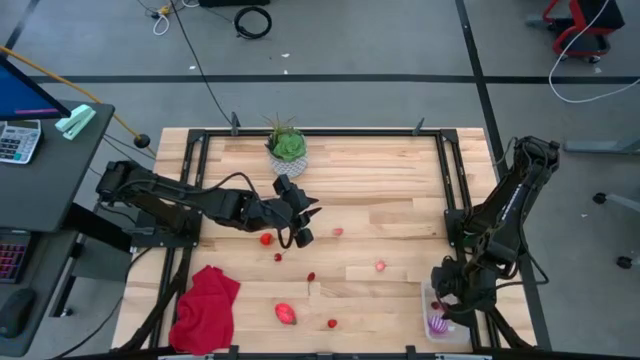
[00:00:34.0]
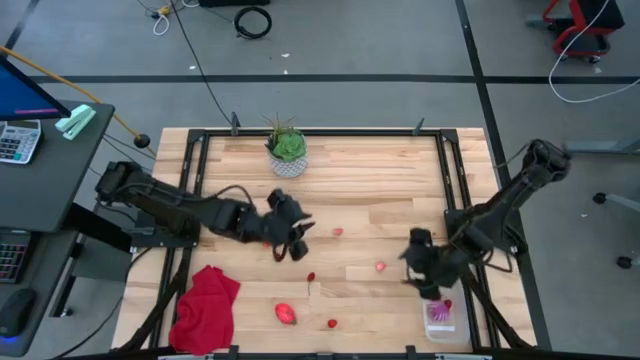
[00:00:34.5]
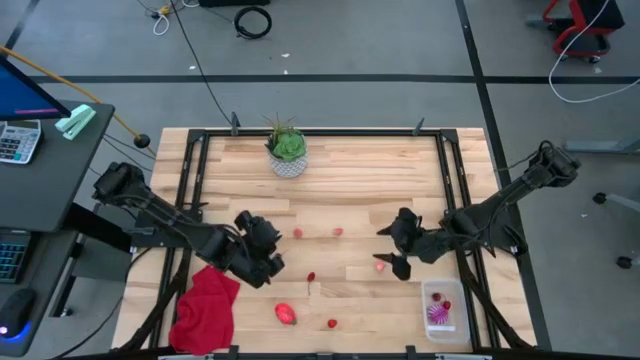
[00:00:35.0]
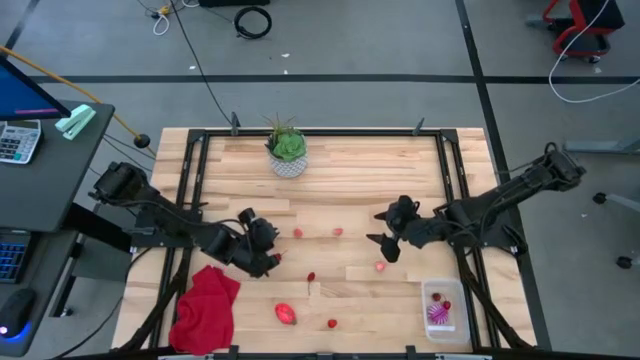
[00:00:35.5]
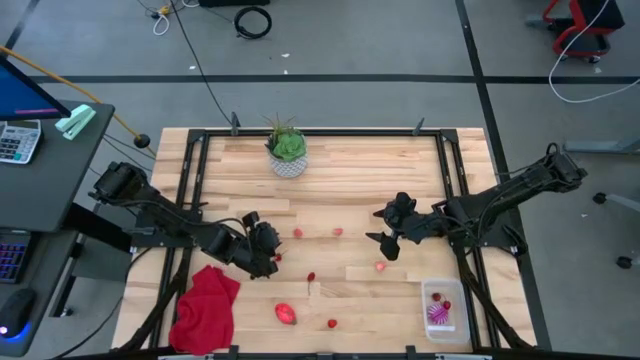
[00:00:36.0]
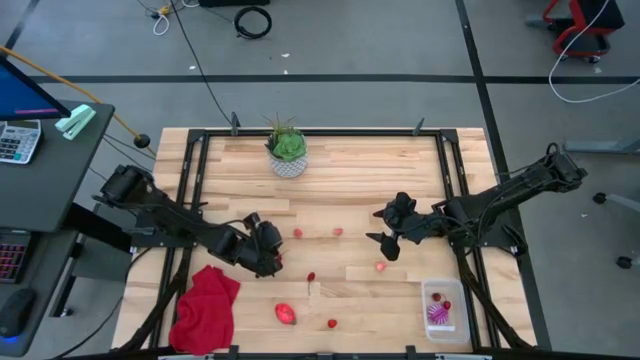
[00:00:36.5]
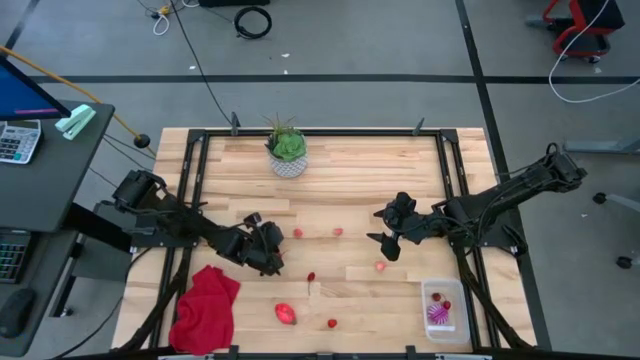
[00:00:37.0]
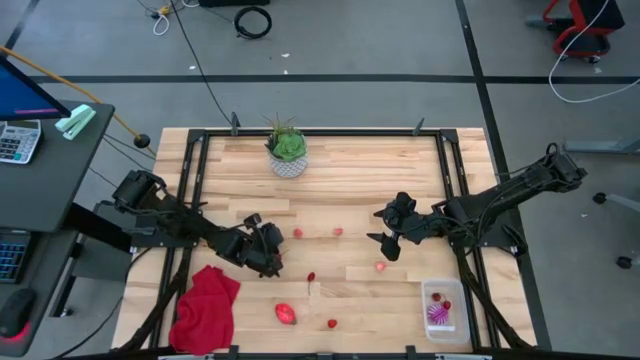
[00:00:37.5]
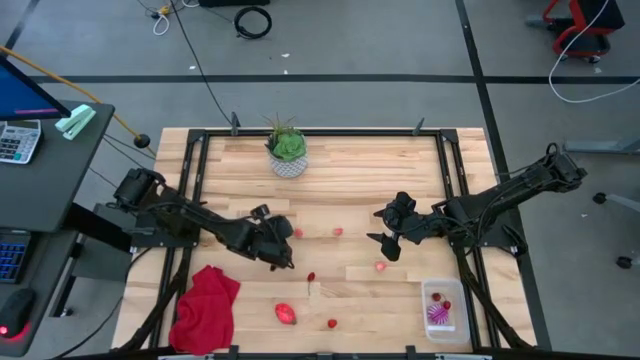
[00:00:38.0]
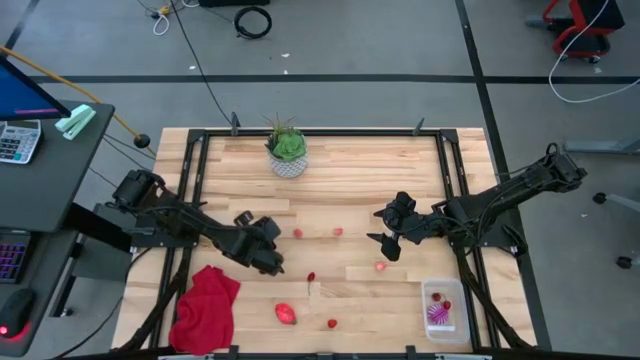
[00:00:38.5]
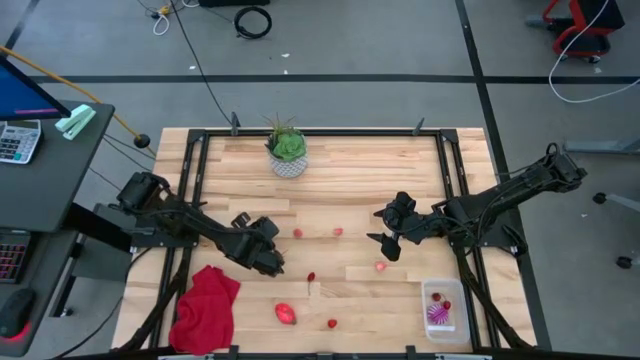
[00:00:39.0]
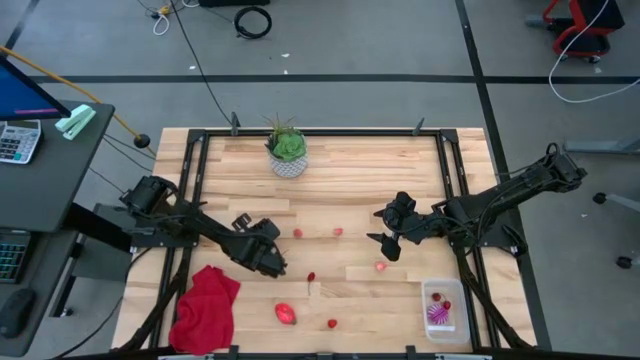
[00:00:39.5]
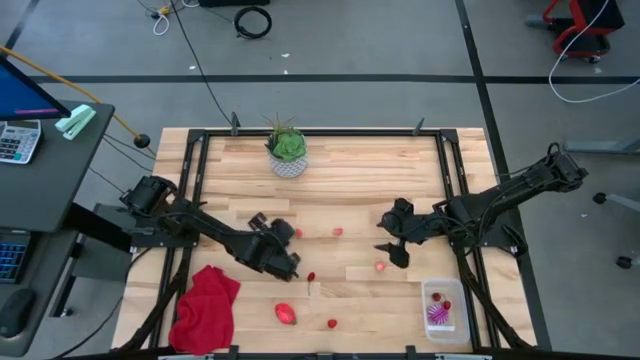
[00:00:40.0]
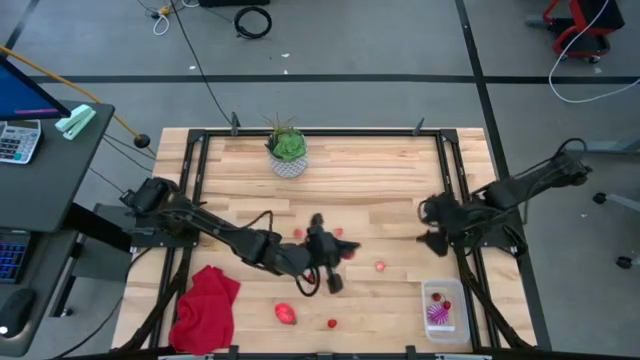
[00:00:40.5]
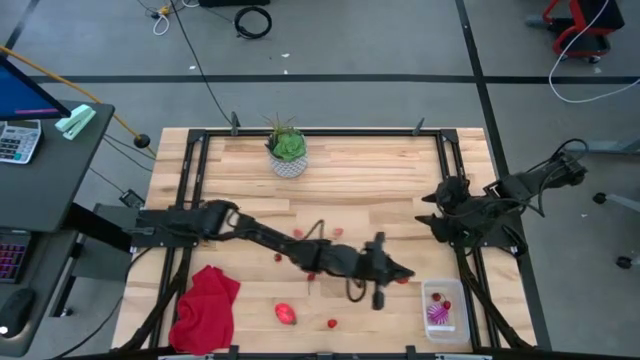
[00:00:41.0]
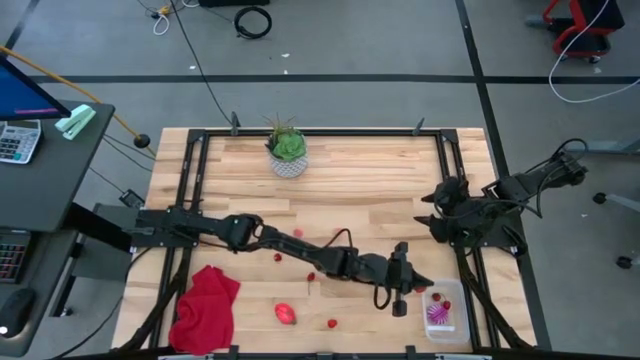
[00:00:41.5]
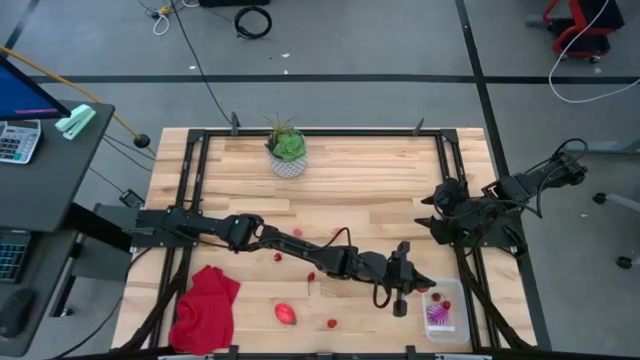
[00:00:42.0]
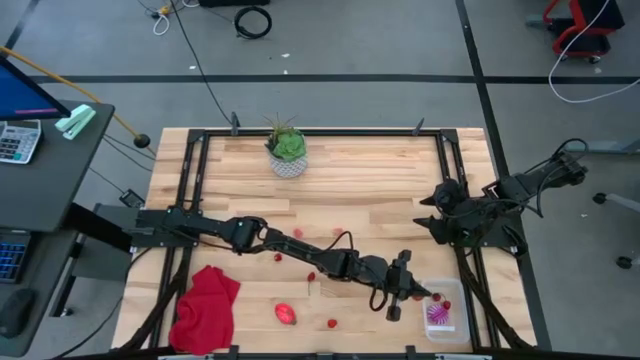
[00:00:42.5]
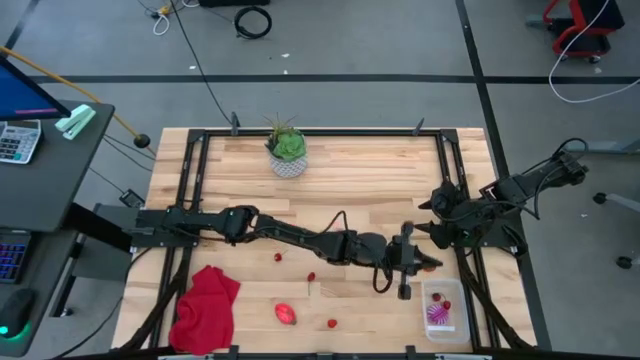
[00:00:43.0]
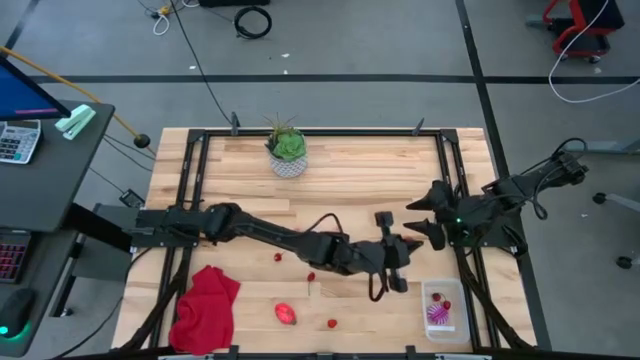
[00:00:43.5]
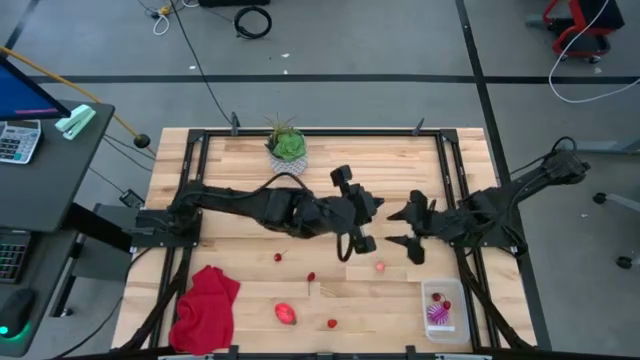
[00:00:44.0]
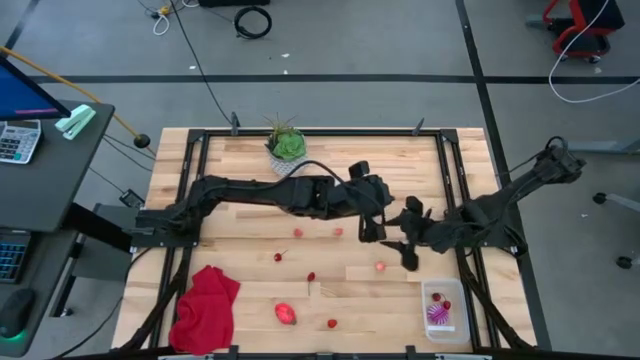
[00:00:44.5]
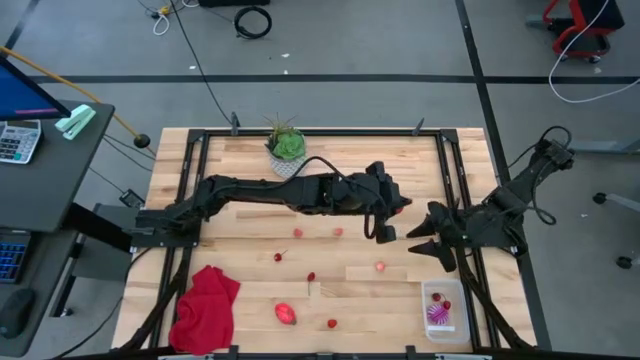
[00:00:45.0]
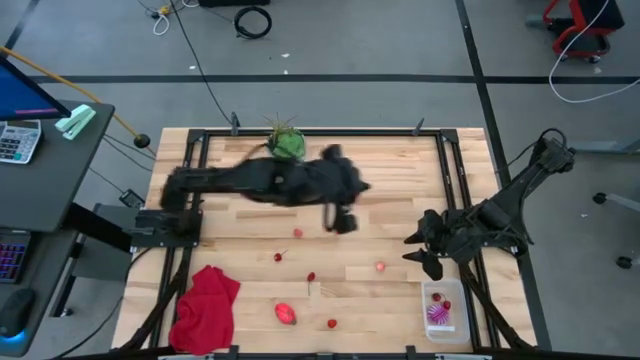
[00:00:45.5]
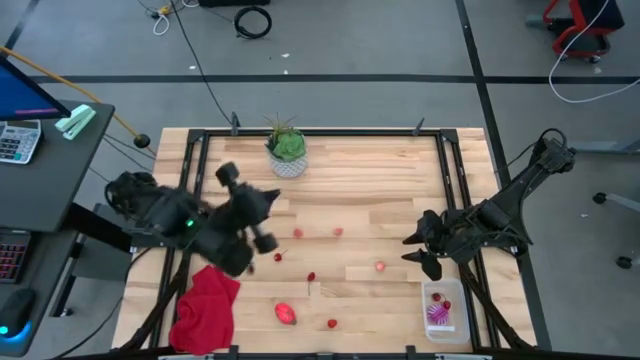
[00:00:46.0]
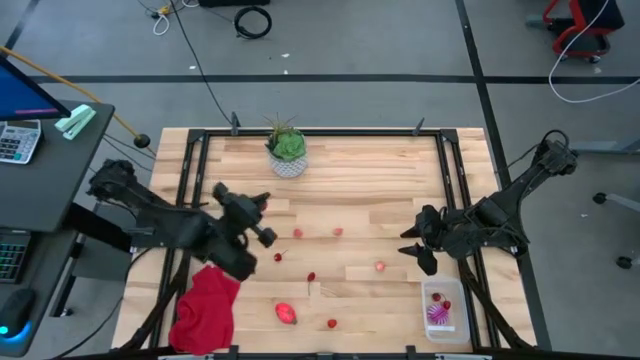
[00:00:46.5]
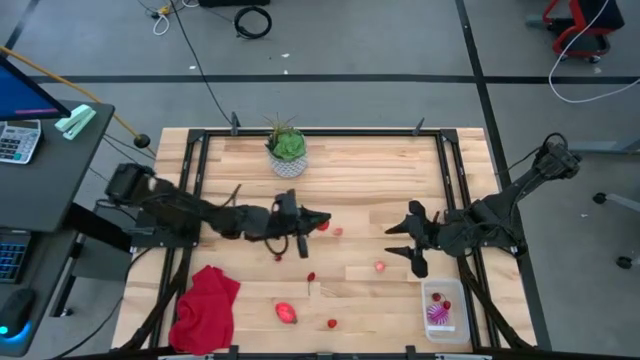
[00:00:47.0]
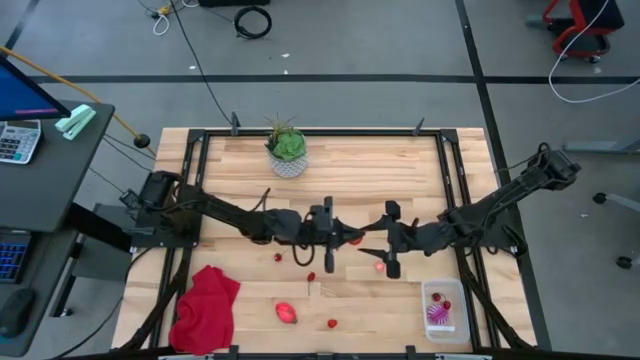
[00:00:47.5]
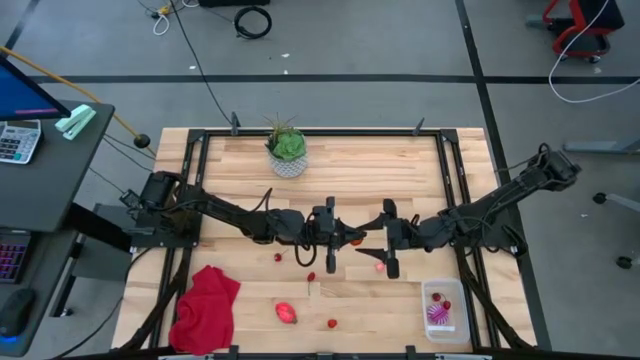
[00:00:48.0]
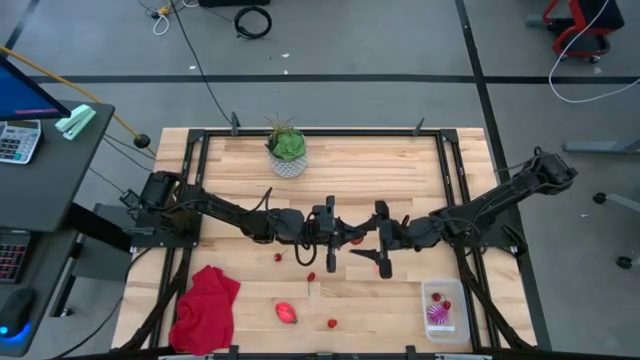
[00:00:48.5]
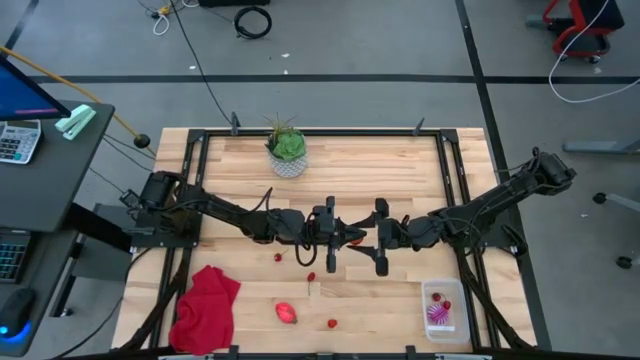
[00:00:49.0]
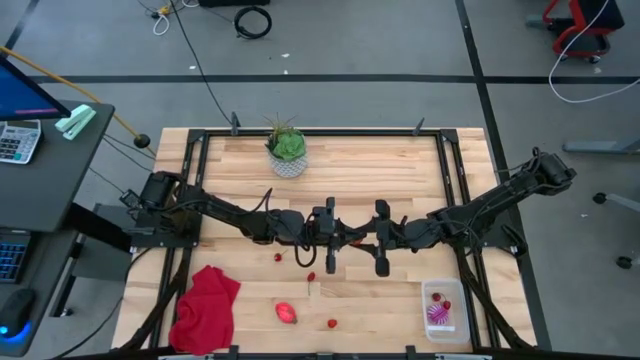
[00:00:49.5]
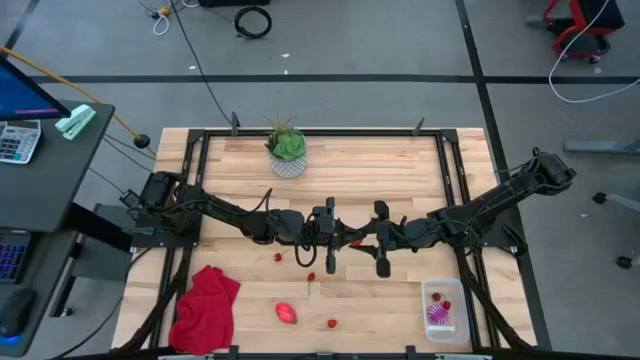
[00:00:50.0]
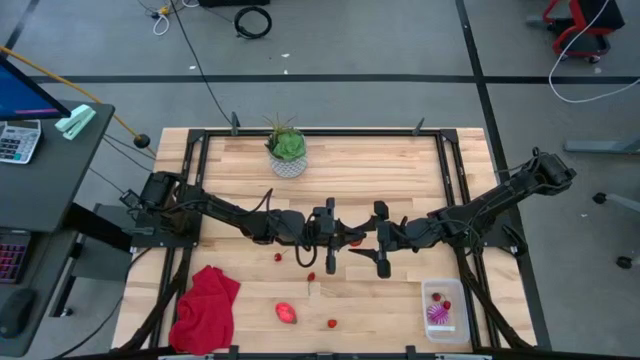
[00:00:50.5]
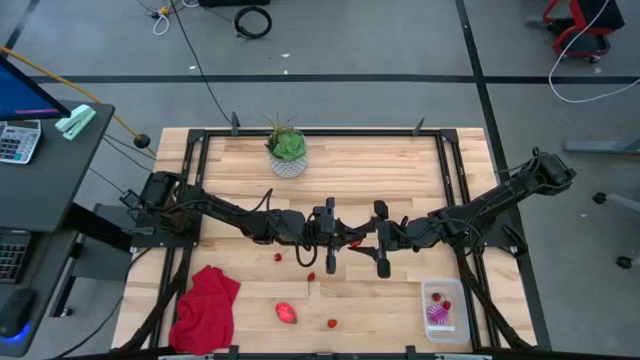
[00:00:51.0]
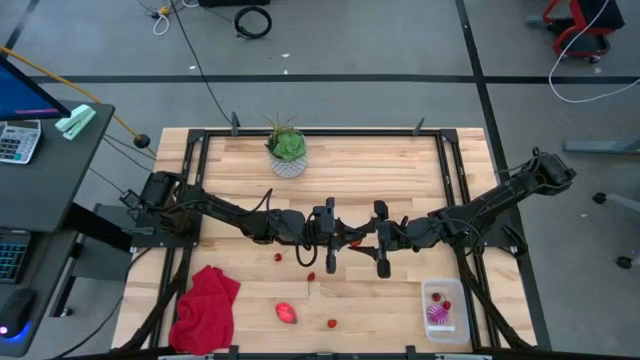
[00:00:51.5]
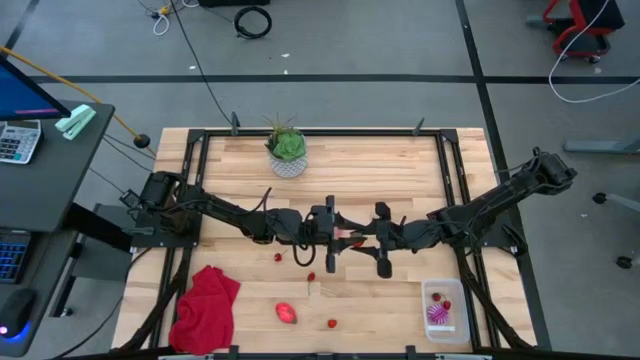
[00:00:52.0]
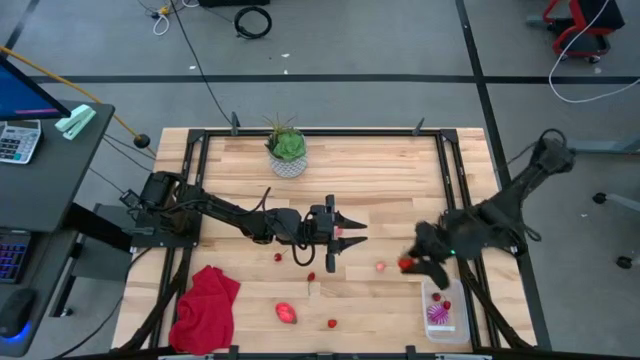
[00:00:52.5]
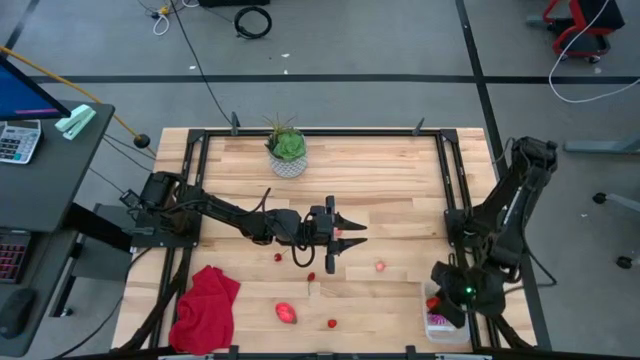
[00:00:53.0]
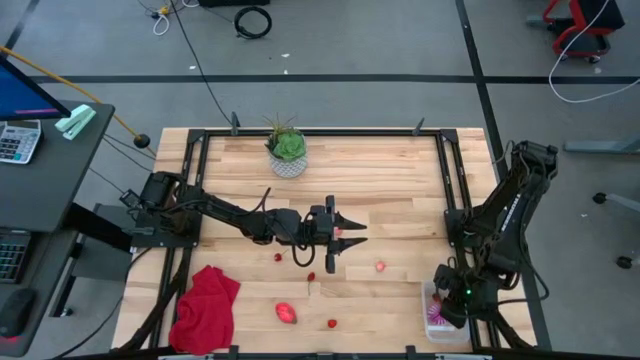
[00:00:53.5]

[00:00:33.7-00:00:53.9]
Task: Pick and placing Produce into tupperware
Put the red strawberry into the transparent container

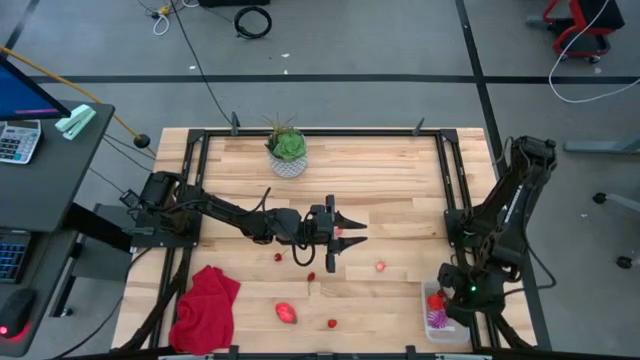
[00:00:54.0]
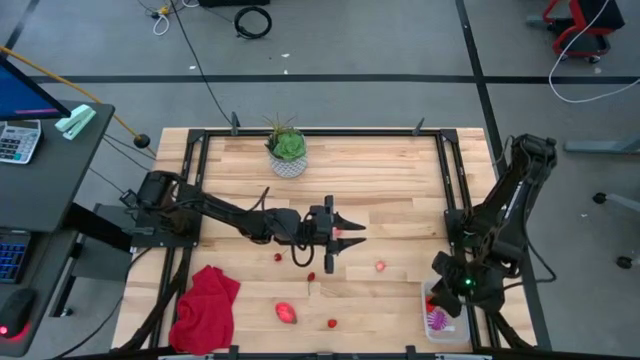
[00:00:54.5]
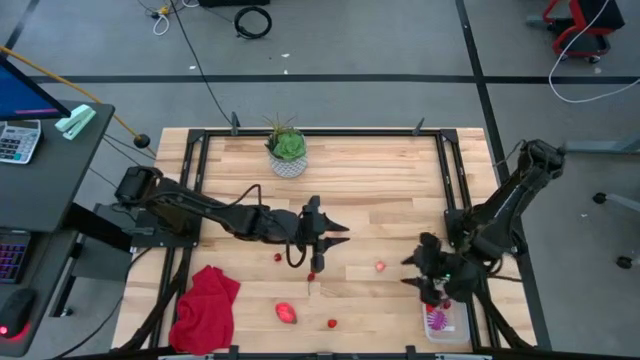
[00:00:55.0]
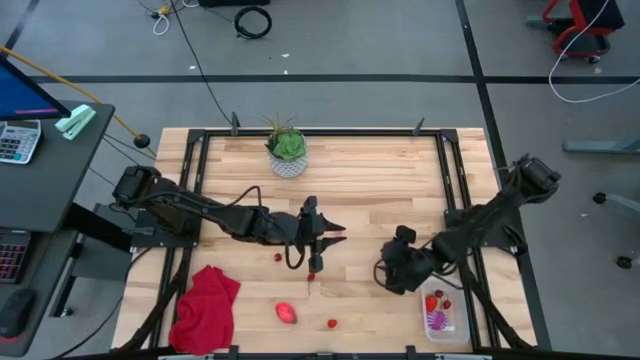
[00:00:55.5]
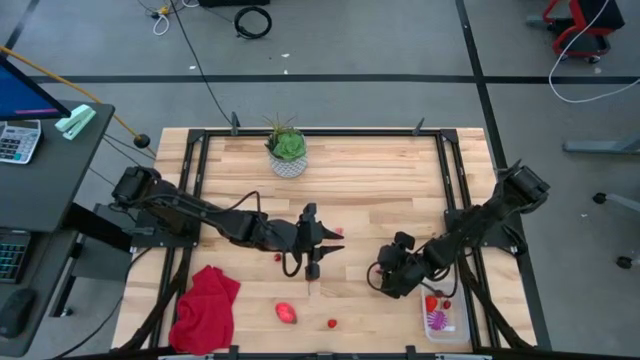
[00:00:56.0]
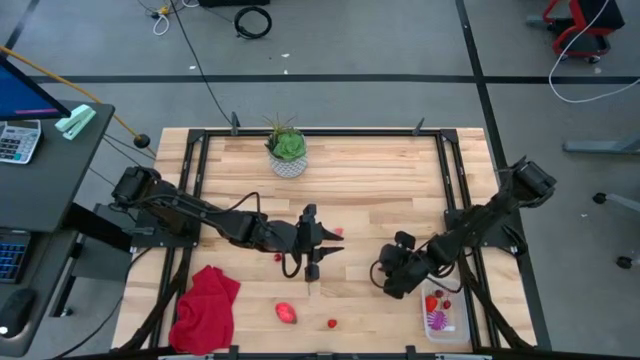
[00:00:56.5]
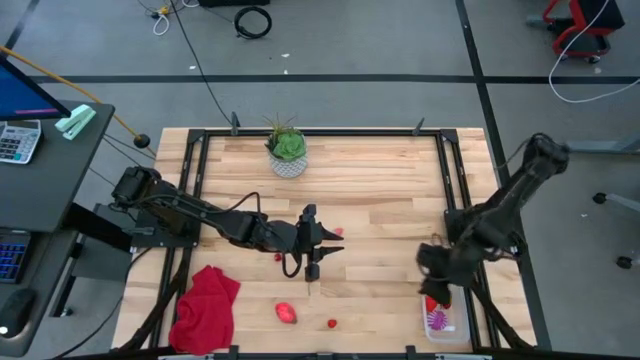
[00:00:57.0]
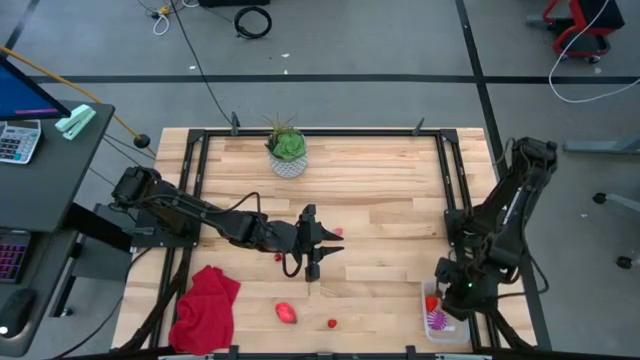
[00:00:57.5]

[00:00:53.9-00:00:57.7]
Put the pink peach into the transparent container
